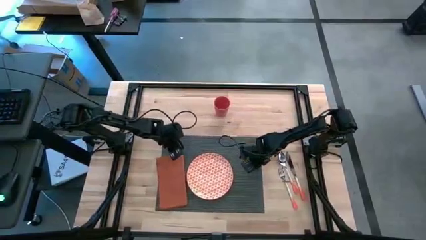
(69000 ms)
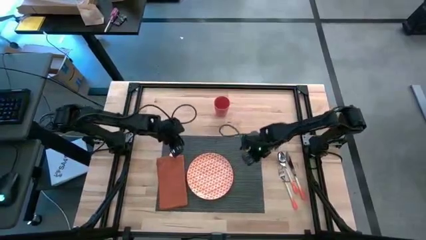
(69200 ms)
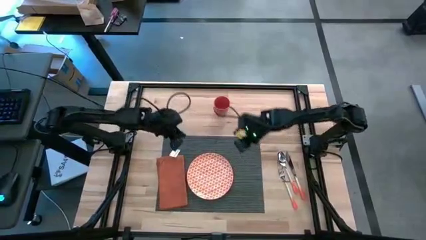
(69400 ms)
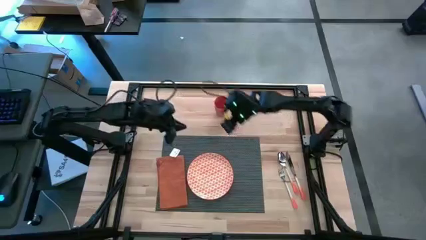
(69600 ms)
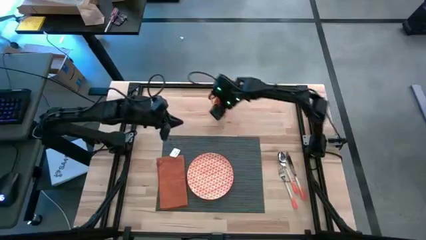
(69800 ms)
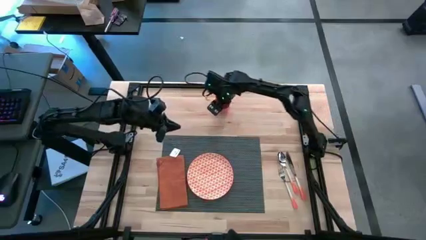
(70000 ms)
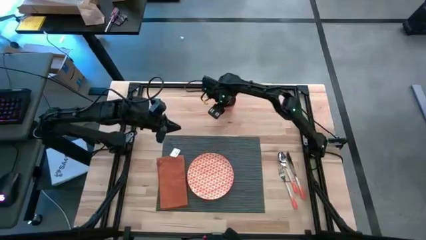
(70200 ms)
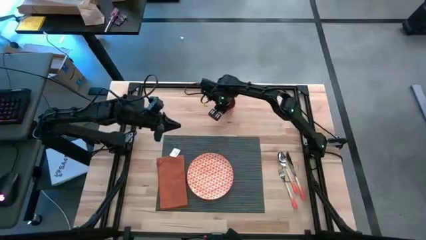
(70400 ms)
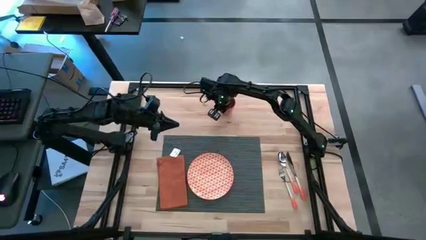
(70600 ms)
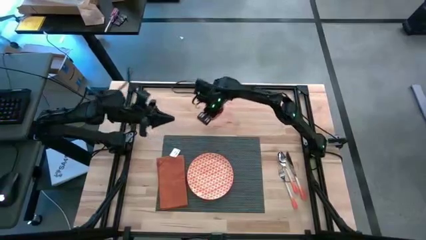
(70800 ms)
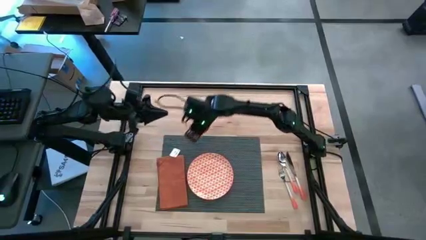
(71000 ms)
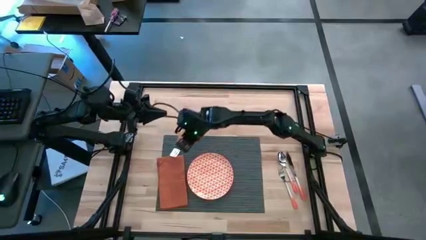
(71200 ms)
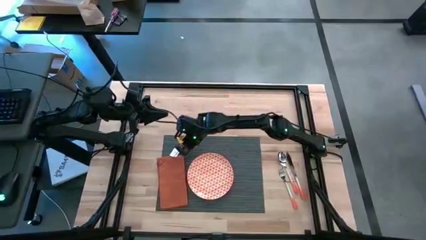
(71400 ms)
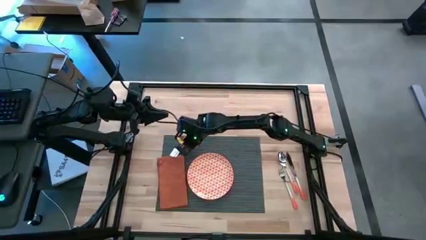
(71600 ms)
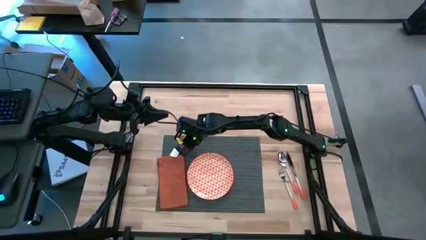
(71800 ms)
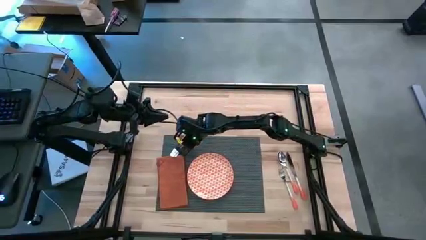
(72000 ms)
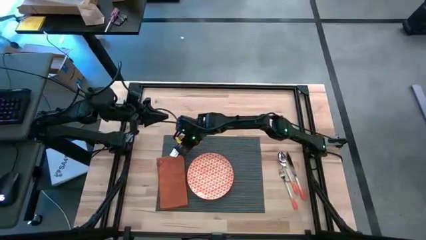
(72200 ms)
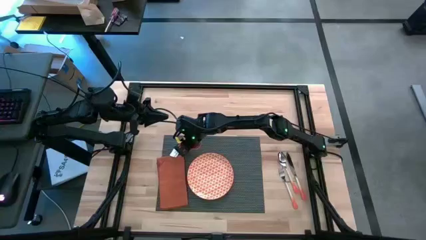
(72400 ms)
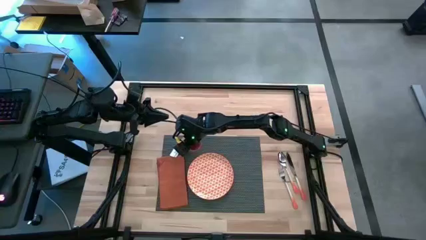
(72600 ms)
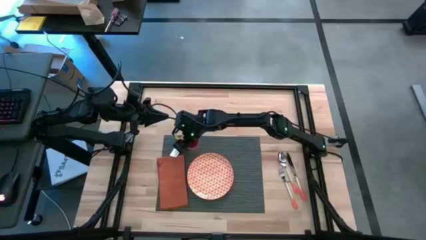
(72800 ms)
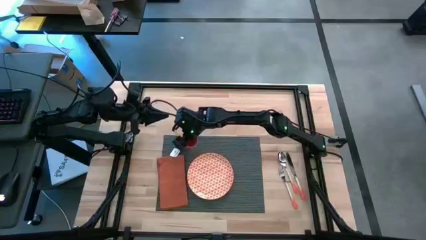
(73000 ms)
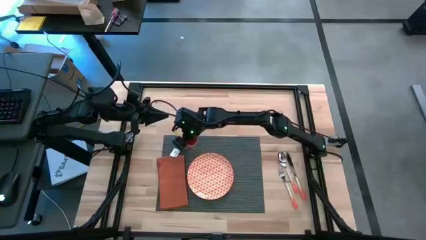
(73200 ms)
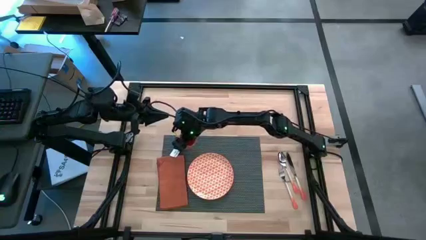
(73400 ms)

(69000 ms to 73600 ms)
Task: Set table place
Put the orange cup to the top of the orange table napkin on the tablemat

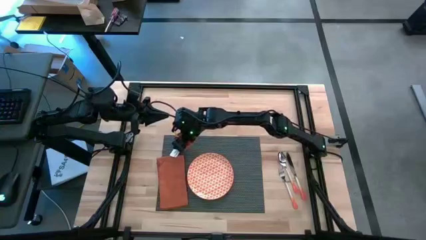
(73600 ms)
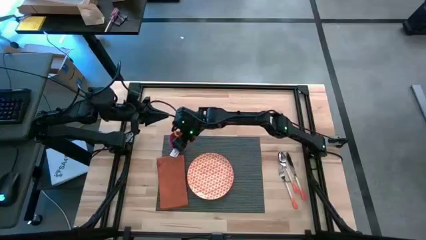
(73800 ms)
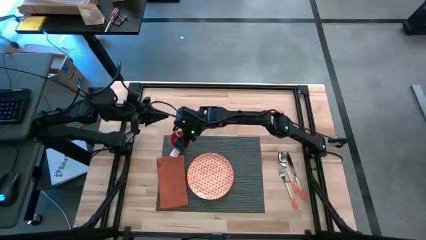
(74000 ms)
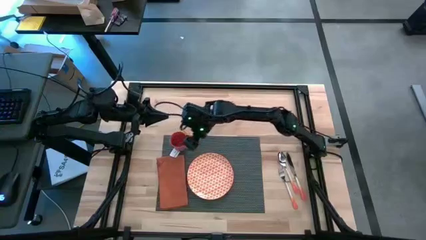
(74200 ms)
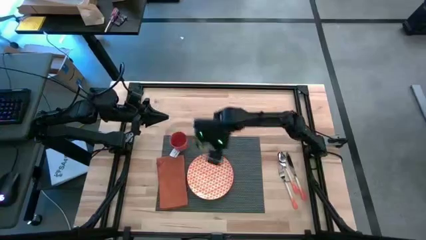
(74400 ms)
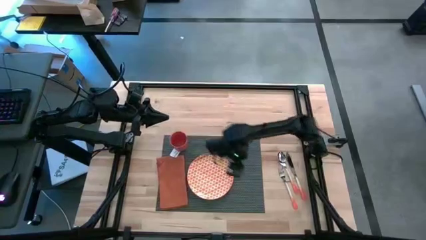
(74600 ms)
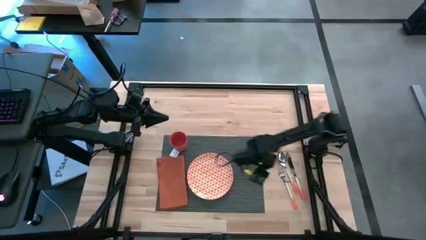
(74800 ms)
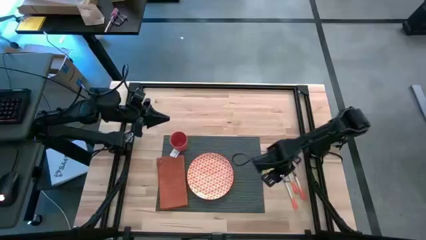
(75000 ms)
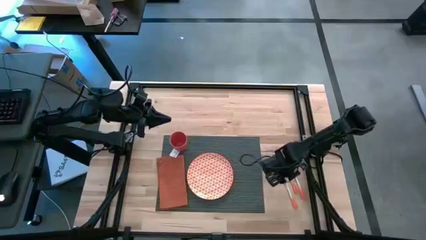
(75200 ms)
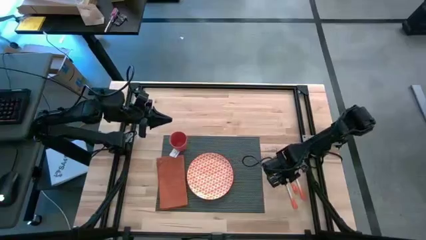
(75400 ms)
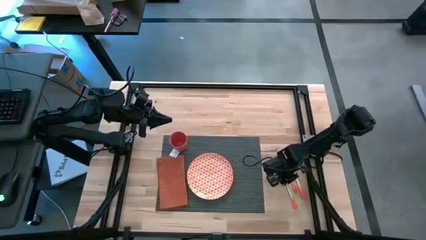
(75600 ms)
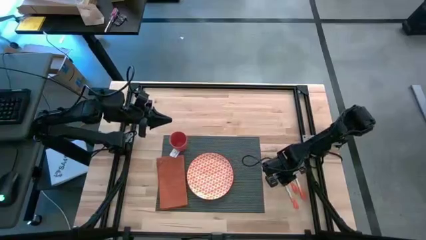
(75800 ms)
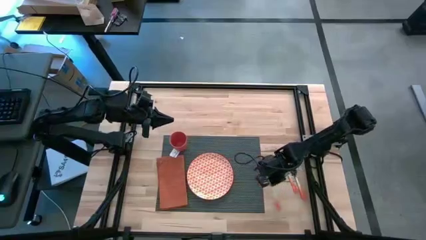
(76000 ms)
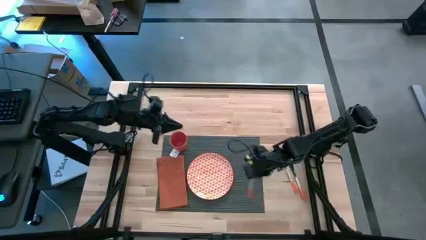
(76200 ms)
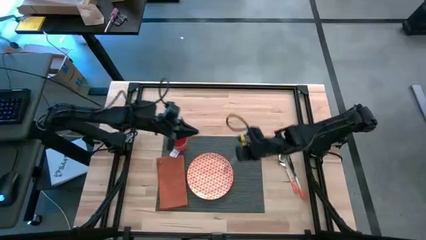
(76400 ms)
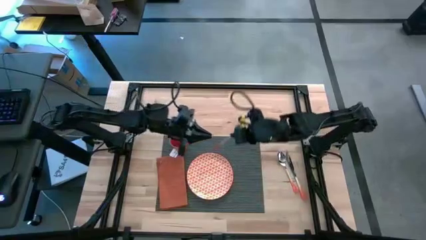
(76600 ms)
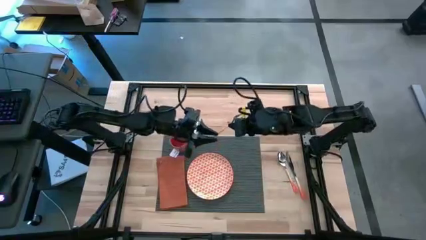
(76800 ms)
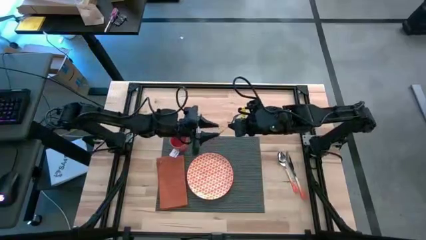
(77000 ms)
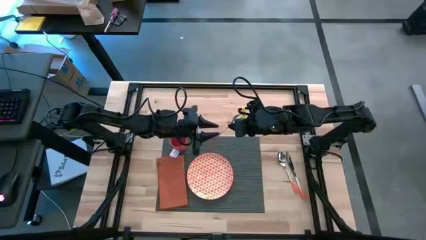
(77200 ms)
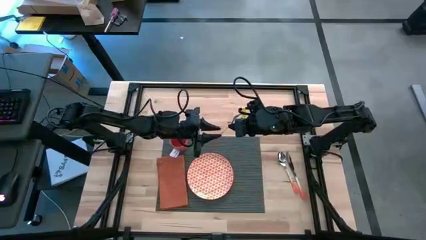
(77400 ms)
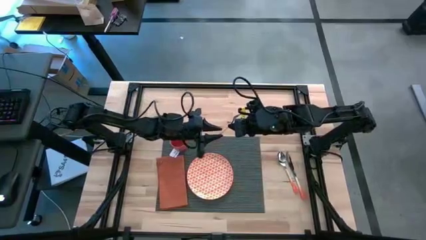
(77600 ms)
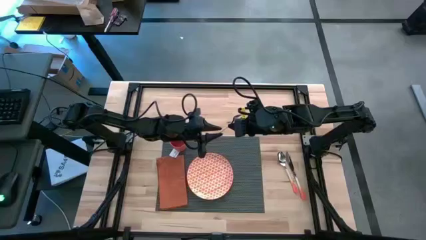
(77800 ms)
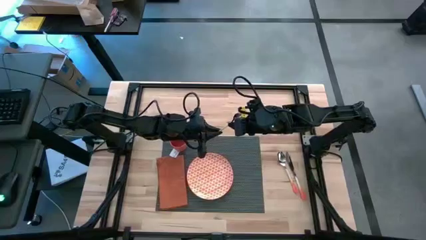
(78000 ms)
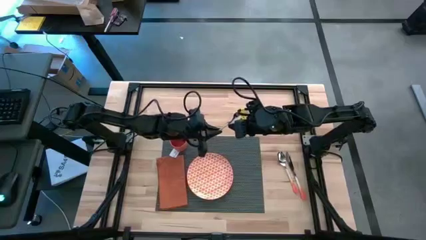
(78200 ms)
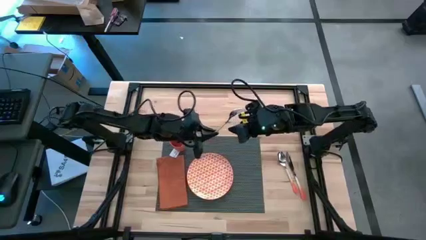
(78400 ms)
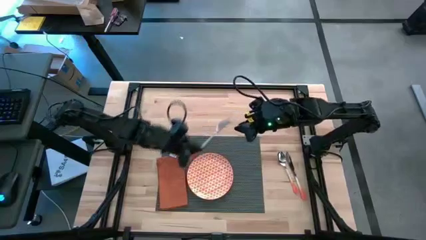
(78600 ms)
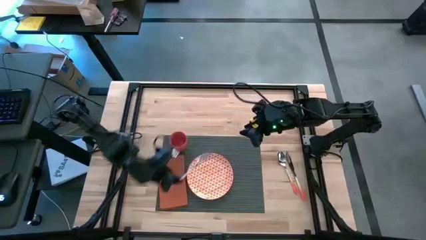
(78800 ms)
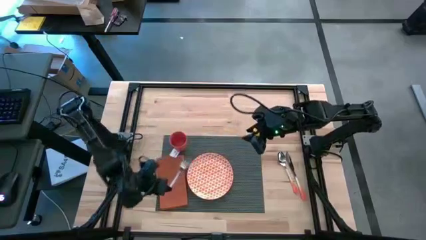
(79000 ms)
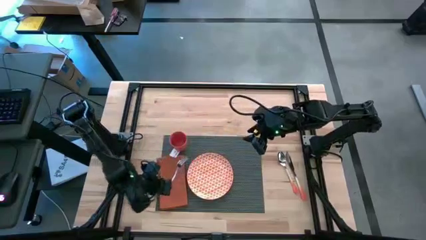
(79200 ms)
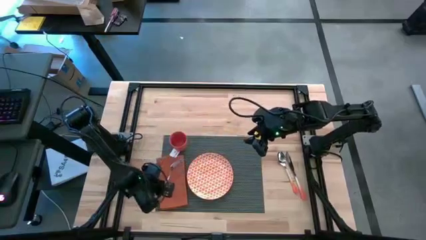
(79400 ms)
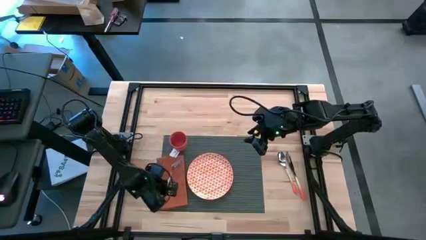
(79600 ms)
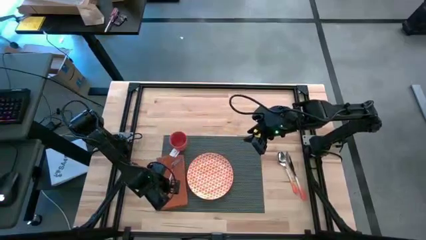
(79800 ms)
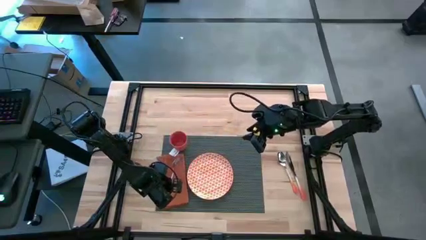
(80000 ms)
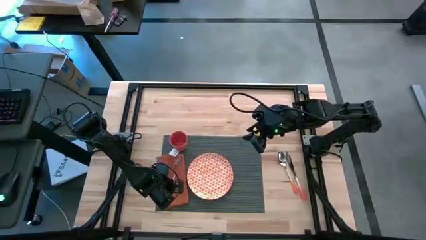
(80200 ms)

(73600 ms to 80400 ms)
Put the orange fork on top of the orange table napkin

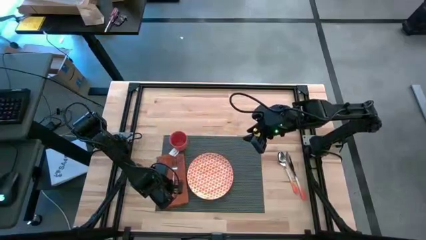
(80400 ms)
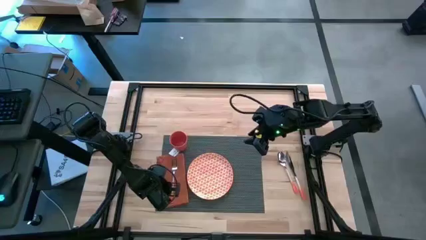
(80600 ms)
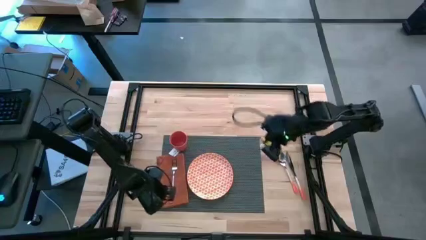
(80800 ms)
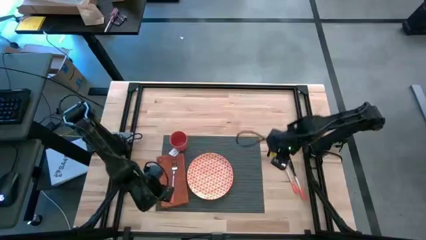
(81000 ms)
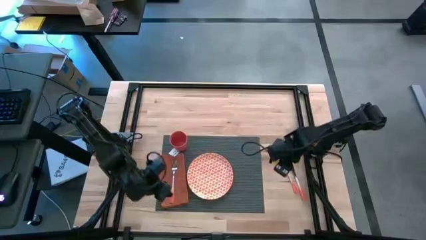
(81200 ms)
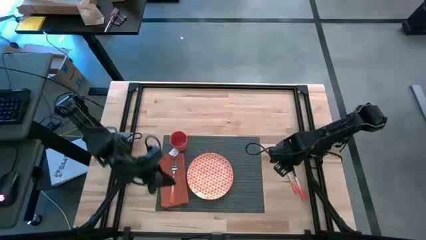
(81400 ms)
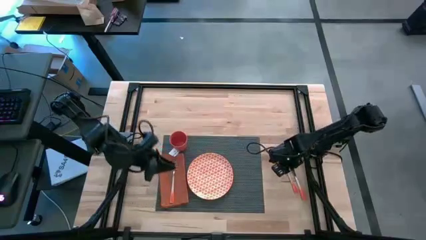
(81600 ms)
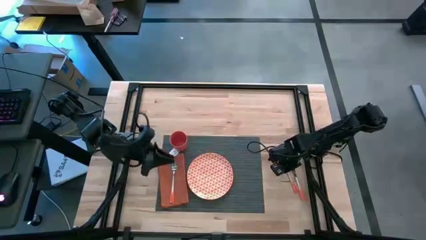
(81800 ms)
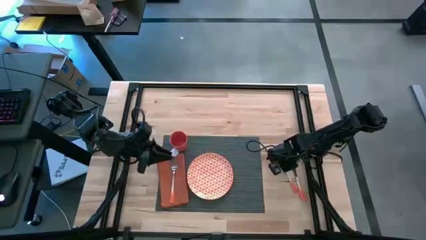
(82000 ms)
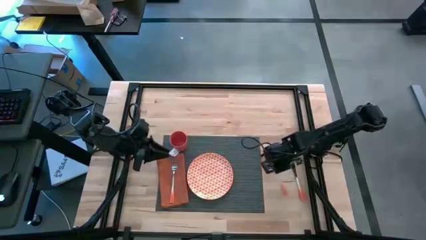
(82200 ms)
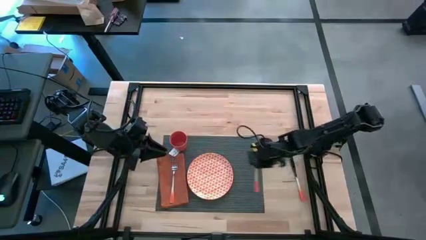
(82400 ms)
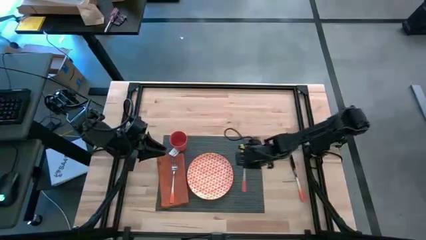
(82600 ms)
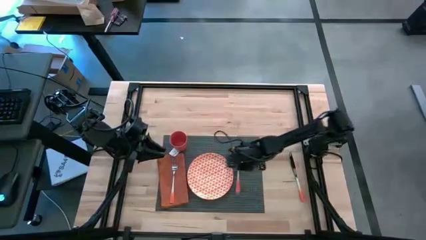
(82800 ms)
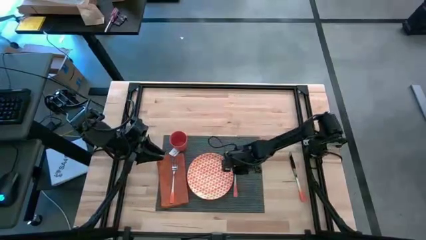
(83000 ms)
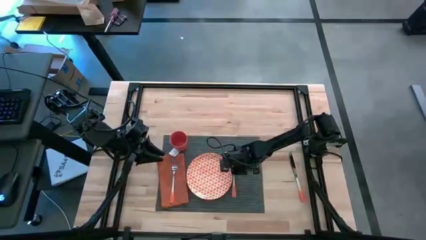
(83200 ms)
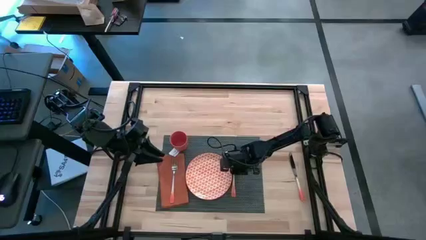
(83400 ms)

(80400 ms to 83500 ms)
Put the orange spoon to the right side of the orange plate on the gray tablemat

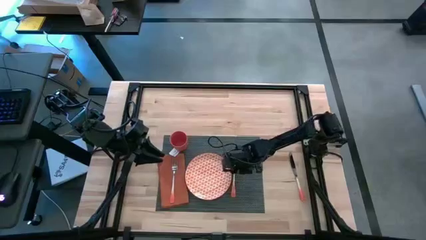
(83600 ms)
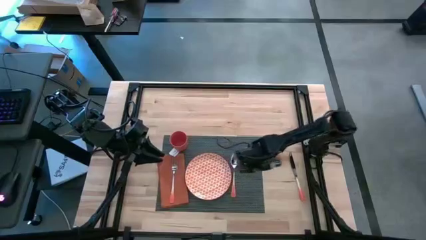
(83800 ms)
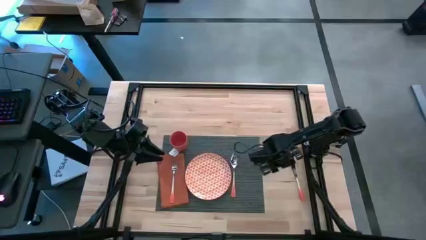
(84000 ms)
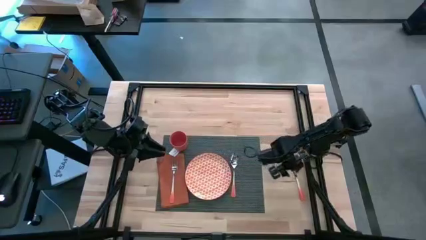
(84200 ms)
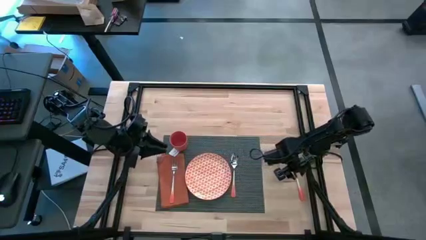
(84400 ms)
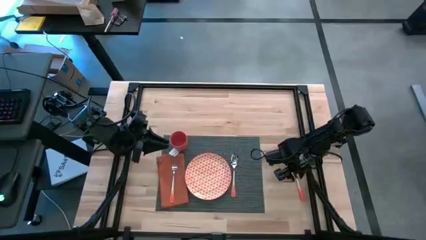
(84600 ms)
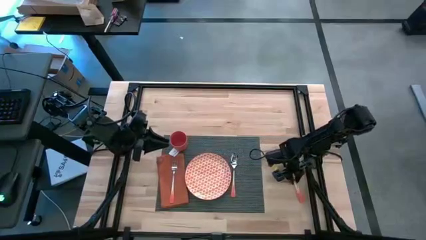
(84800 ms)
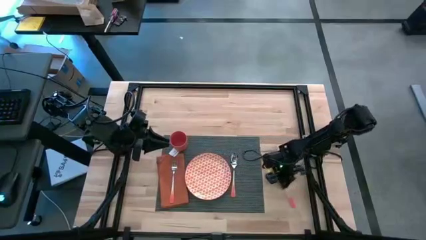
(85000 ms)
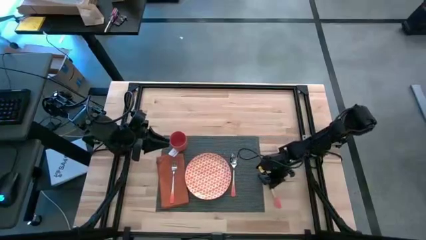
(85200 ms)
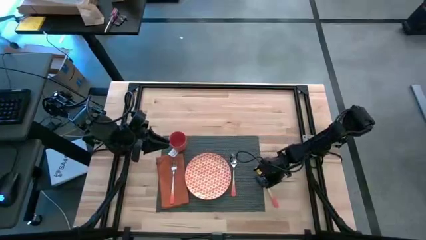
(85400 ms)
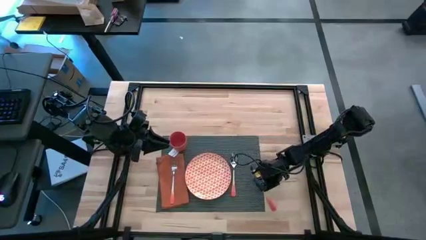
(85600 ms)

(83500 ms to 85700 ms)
Put the orange table knife to the right side of the orange spoon on the gray tablemat

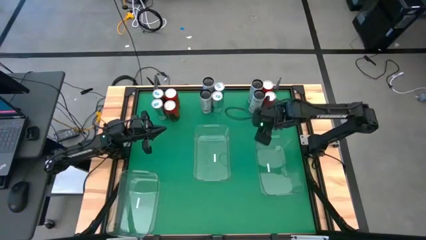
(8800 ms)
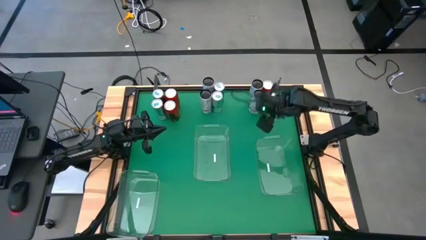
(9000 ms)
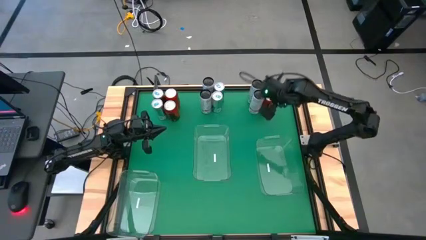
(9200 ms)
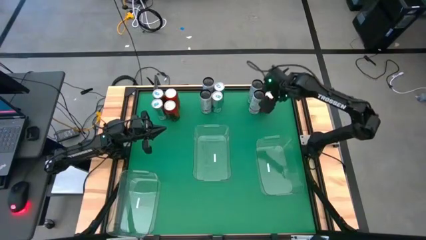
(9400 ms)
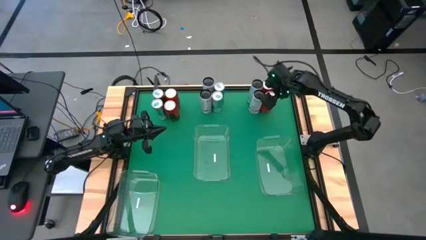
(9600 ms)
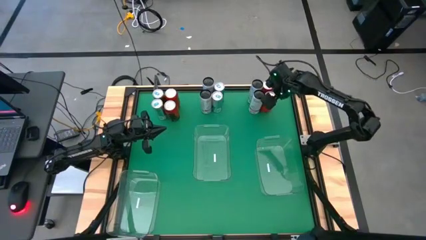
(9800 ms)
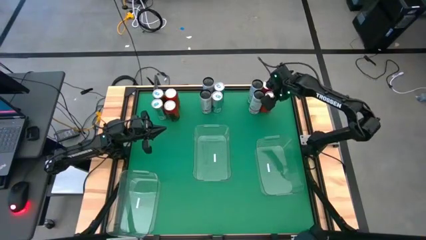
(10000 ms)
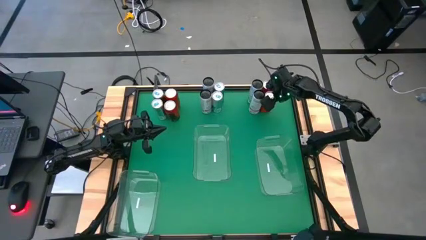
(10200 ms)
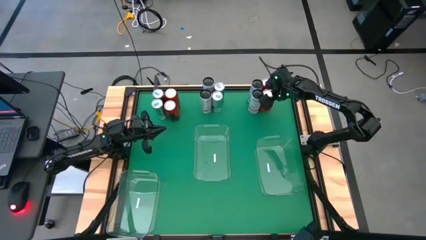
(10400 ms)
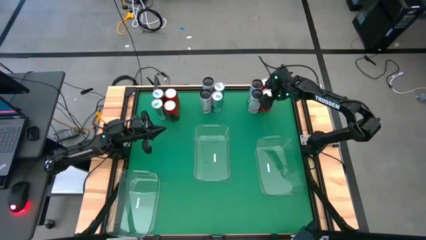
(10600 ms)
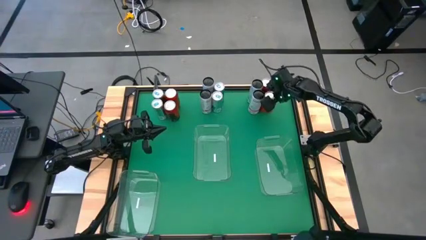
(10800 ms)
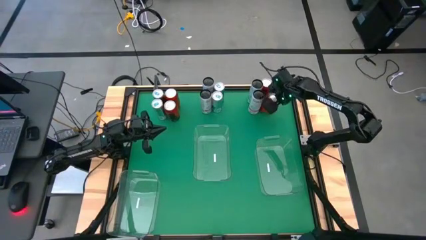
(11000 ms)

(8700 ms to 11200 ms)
Task: Sort soda cans
Put the bottom right red-black soda can into the middle right transparent bin
